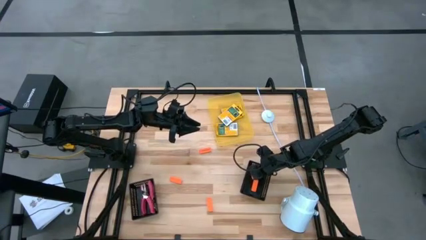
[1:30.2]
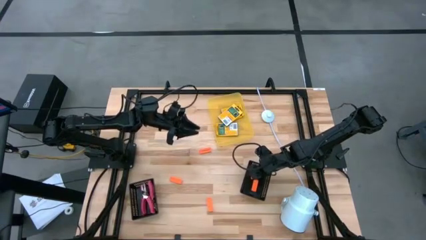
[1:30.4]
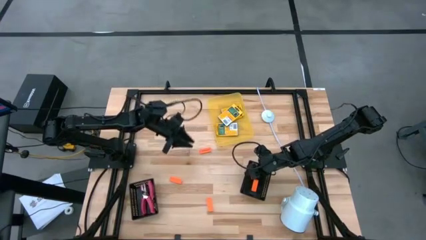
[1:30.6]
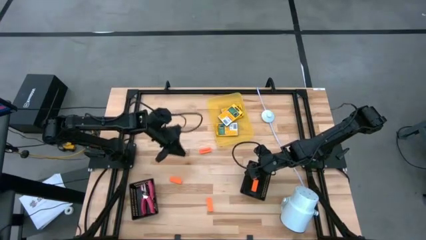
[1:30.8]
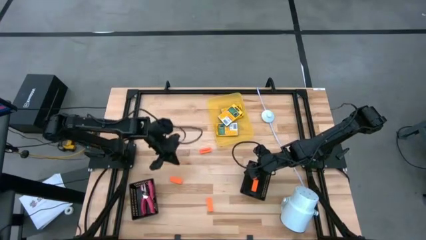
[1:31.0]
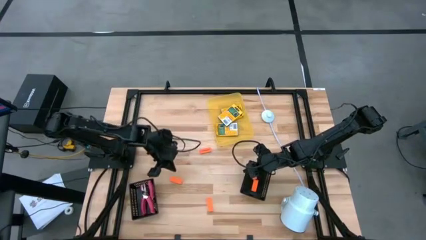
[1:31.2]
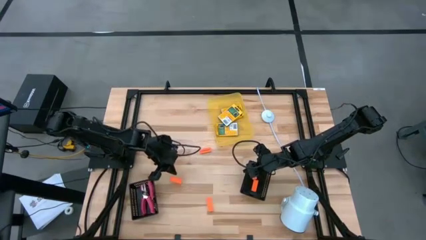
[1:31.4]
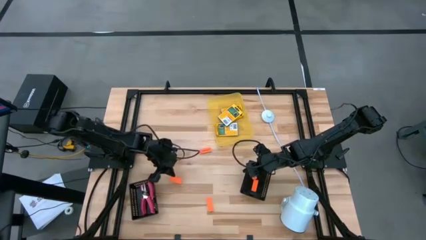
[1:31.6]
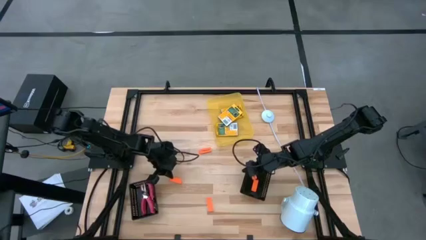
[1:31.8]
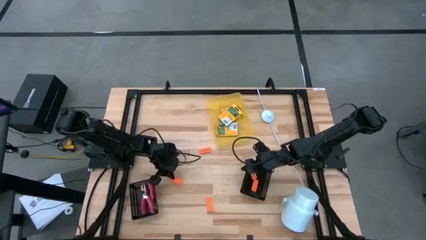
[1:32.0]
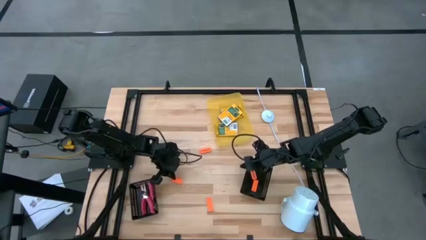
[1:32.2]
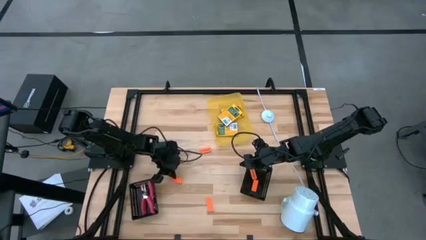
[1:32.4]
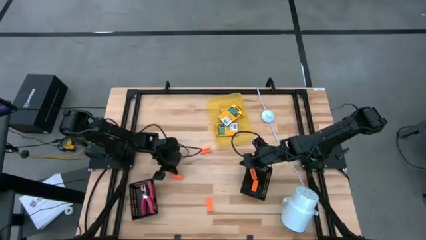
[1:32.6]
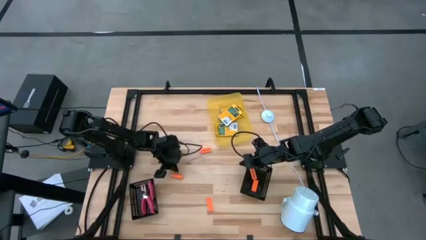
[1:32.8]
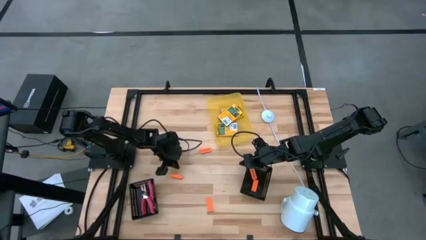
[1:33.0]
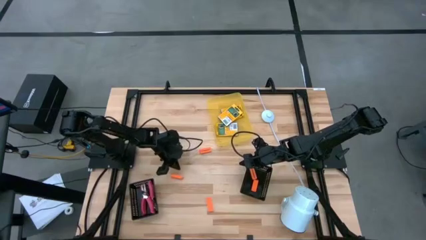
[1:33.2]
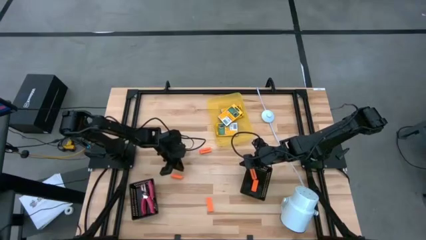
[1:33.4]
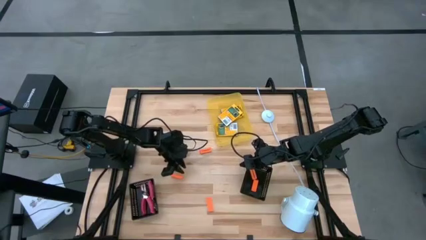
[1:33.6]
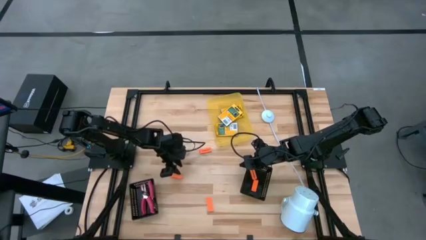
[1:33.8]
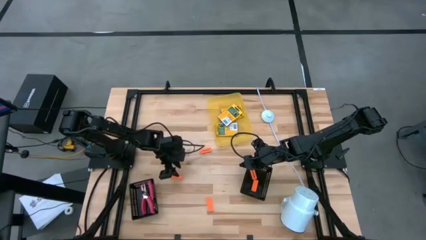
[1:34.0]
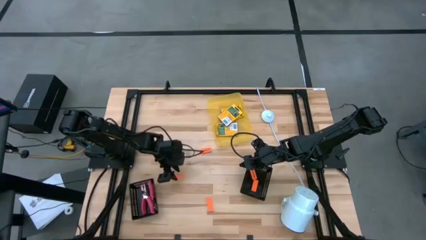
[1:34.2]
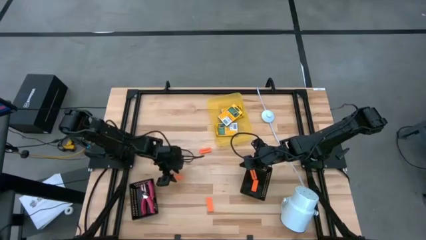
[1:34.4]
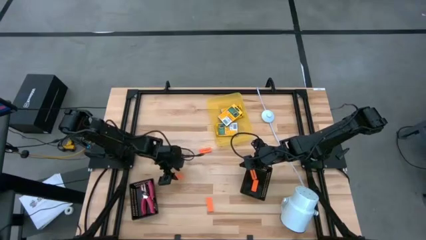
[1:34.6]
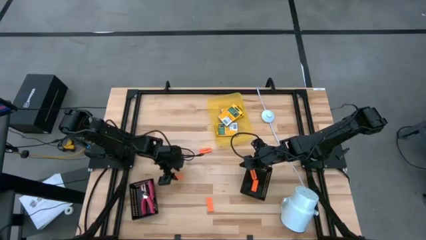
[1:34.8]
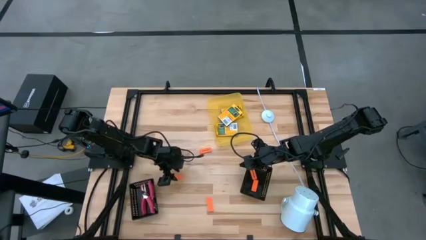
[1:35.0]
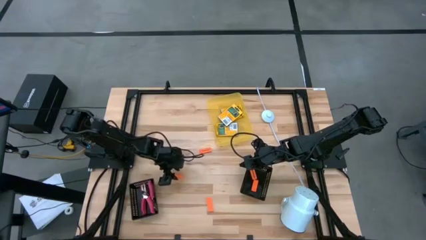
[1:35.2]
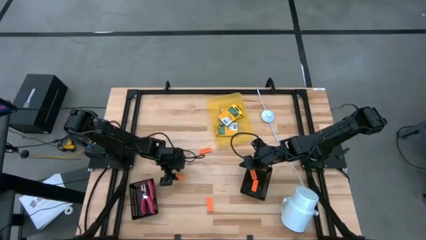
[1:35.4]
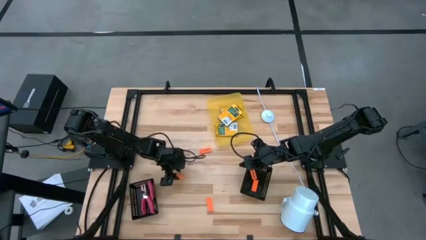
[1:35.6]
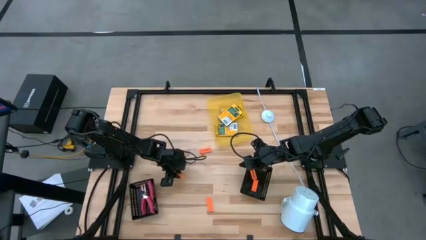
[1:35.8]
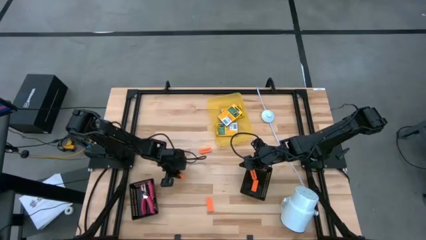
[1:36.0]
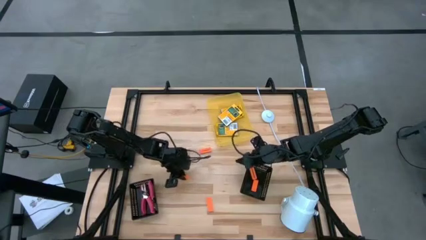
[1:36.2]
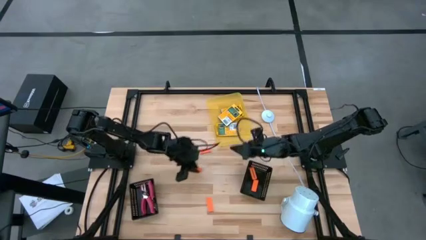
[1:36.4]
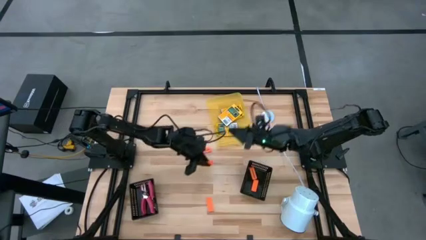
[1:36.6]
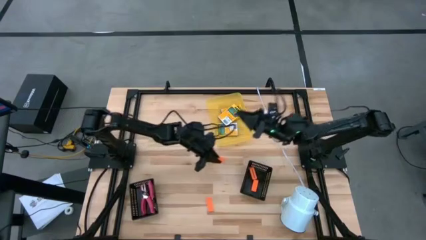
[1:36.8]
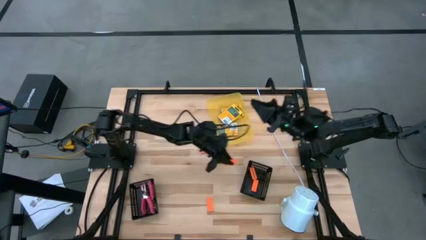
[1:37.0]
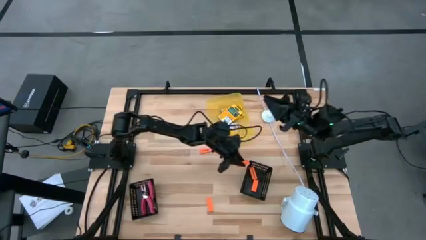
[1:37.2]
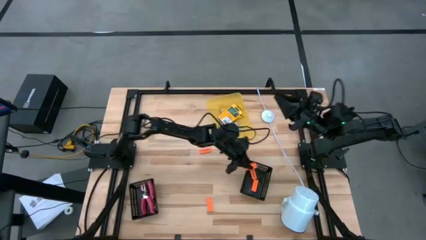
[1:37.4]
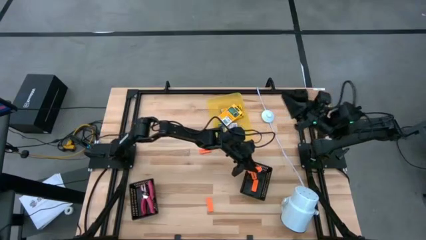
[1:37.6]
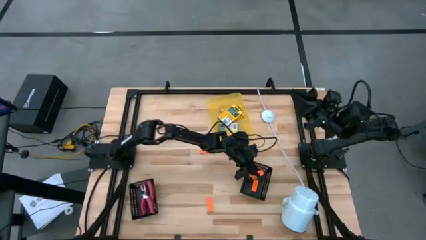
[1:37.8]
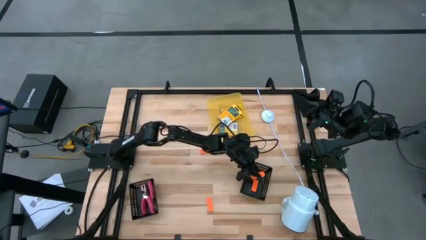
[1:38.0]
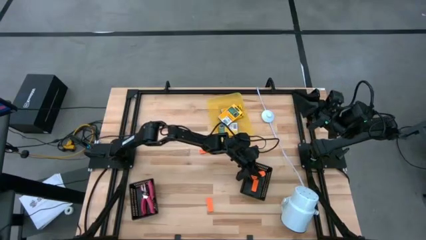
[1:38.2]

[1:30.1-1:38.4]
Task: Pick & Place School Supplies
Put the orange eraser into the right black bin

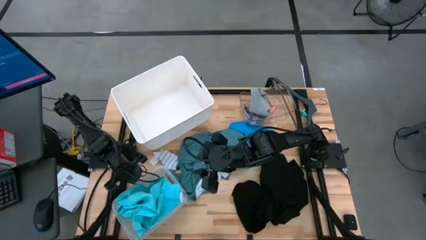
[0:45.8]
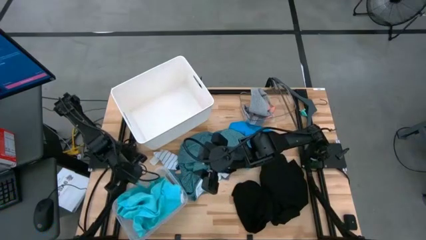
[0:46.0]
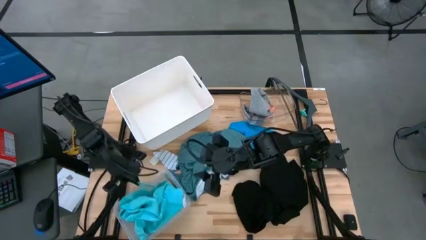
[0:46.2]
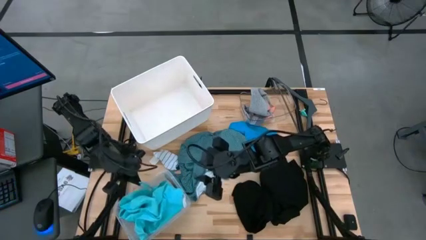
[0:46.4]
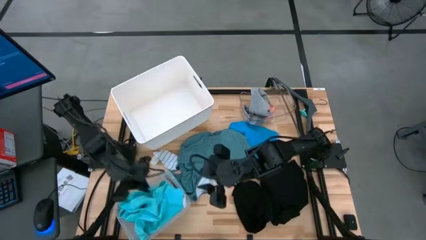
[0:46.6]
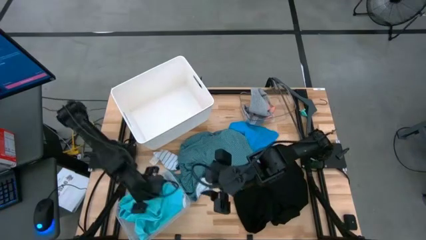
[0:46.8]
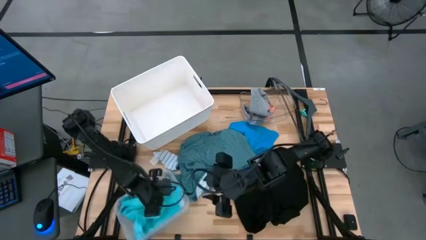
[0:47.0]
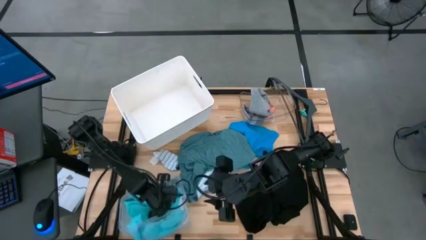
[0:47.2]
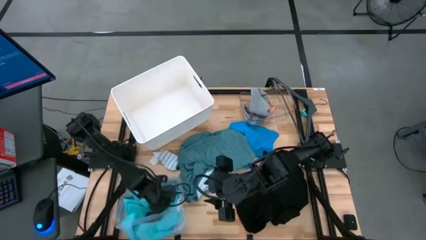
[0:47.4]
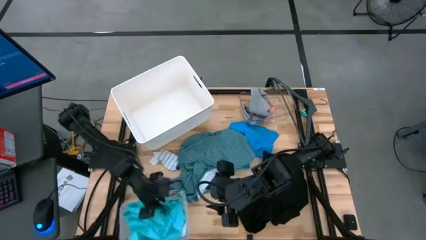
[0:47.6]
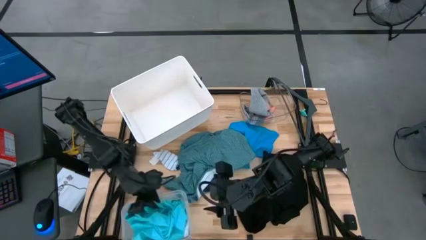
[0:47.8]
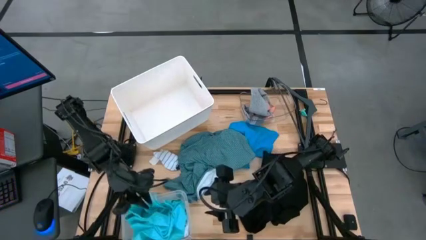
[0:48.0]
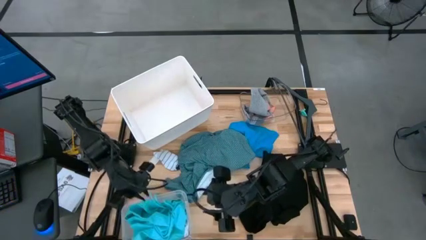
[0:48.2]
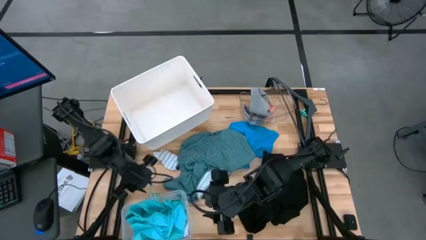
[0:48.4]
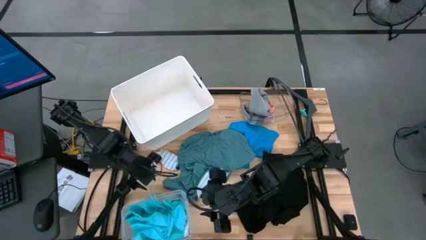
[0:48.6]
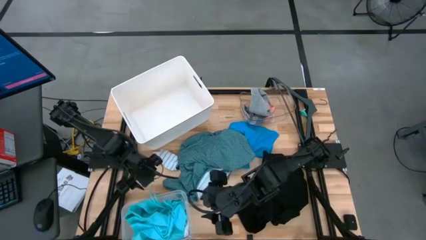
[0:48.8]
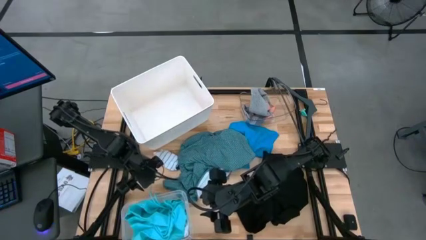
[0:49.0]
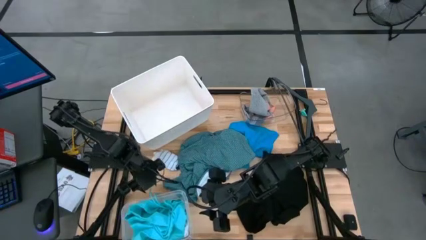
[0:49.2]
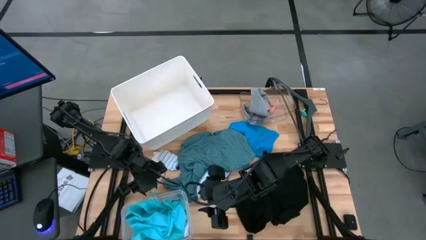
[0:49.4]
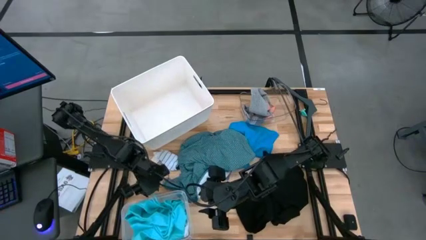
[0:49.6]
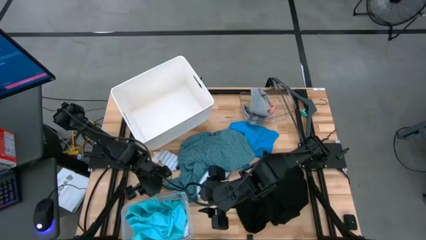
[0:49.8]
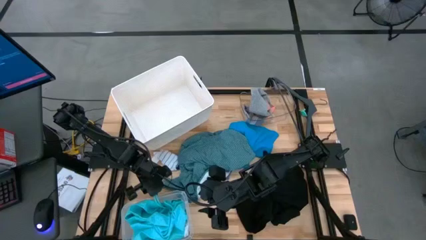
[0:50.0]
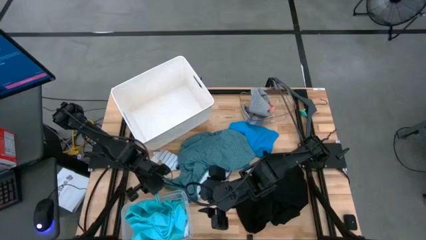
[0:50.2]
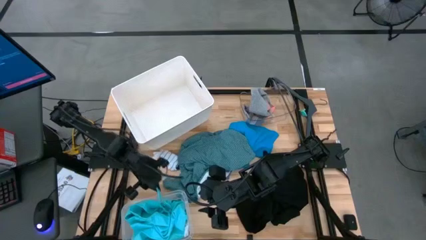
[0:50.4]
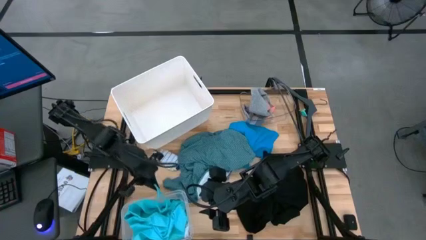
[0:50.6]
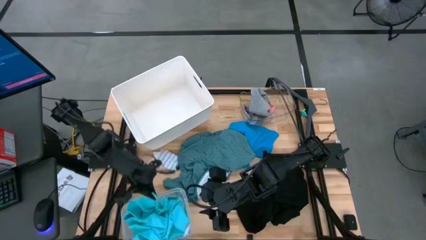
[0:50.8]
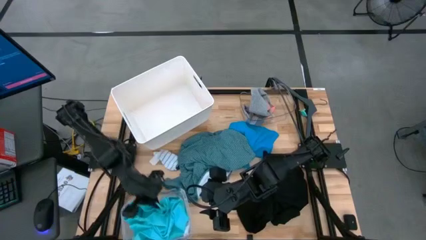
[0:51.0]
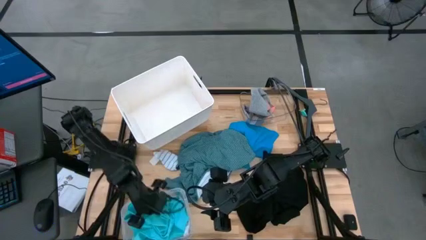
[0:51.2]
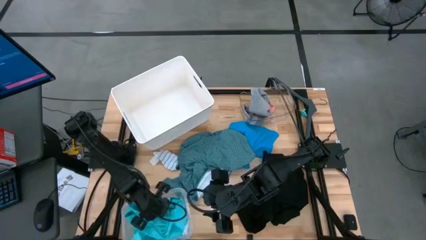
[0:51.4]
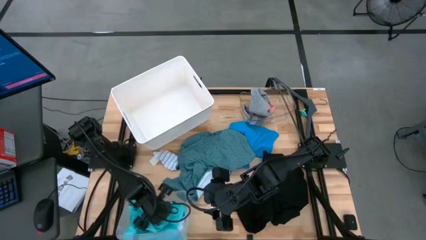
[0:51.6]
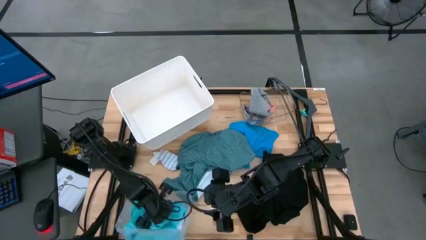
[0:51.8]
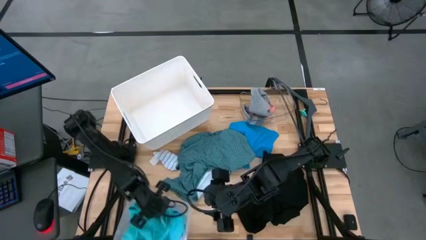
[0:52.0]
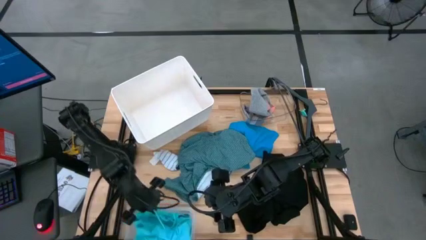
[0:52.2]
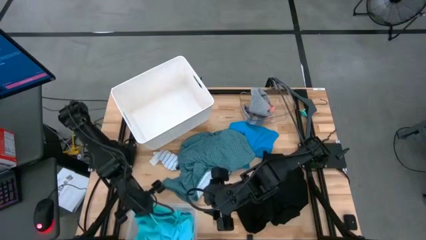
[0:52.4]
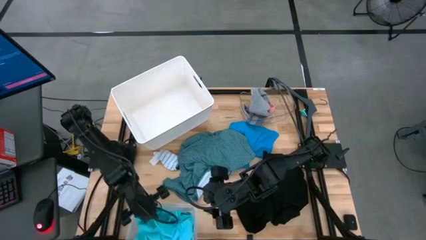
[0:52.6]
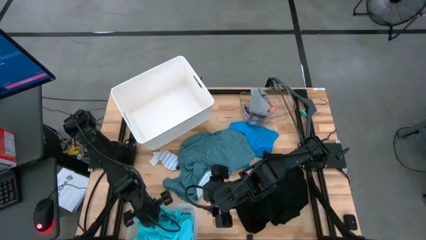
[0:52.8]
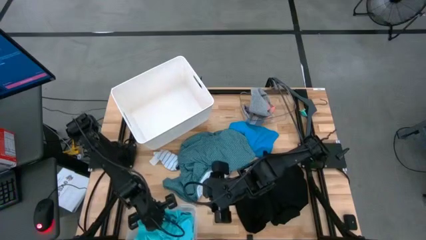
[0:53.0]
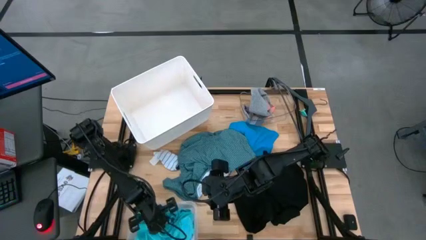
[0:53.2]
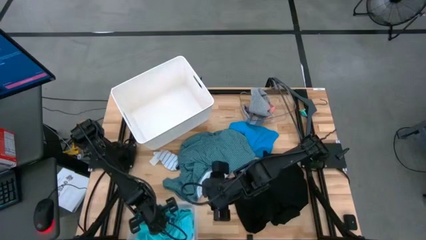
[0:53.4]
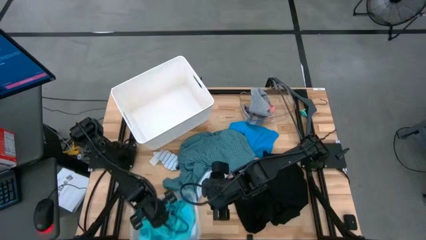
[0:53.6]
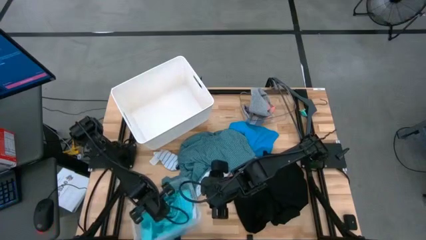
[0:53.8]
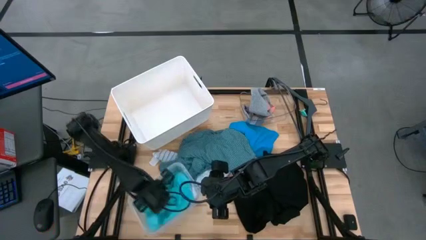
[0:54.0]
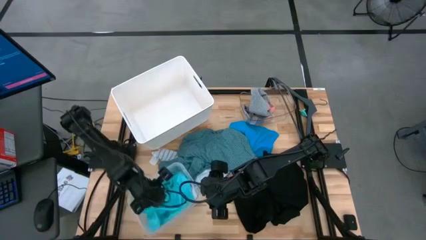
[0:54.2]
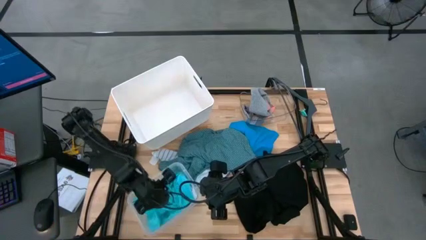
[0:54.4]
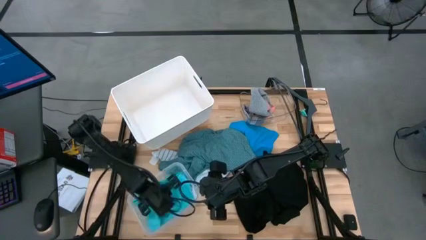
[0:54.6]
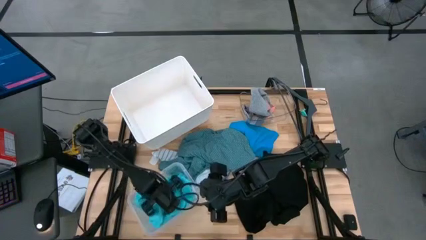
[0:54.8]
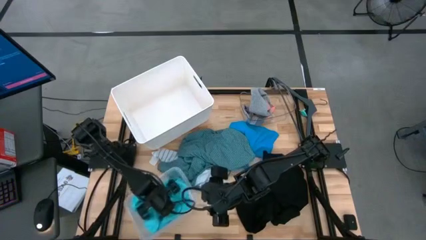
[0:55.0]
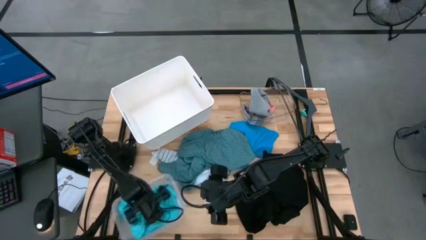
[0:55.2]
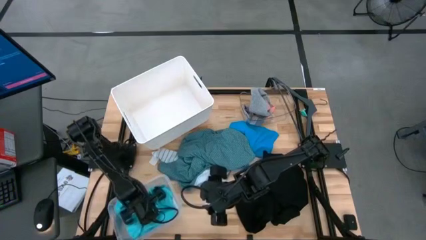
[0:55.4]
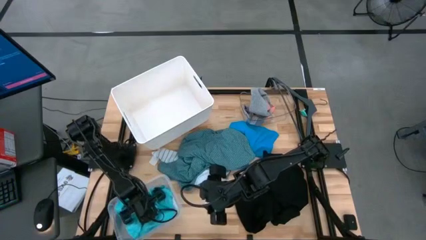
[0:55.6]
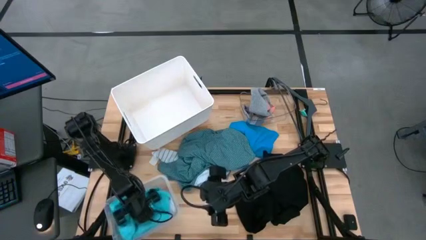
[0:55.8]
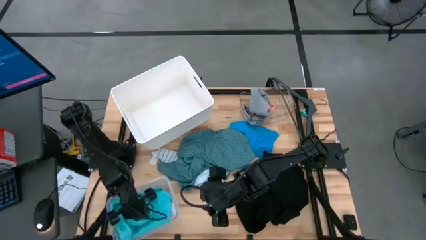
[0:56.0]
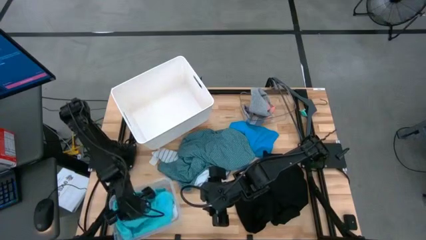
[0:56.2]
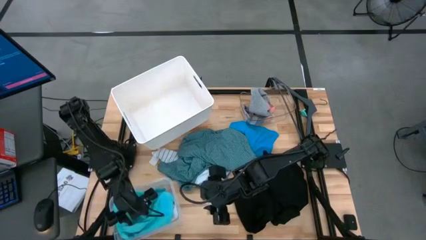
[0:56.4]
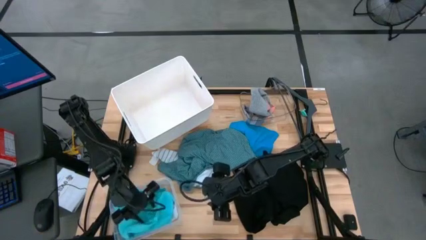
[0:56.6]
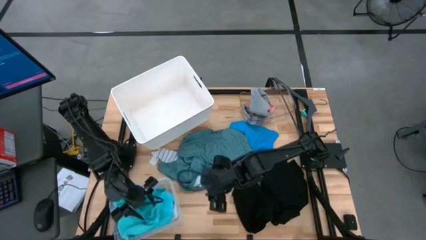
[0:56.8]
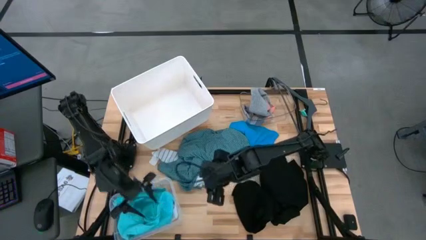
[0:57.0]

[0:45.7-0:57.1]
Task: Pick & Place Cloths
Put the light blue shorts into the bottom transparent bin
